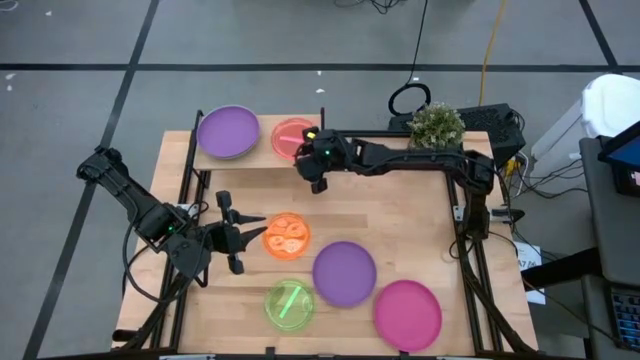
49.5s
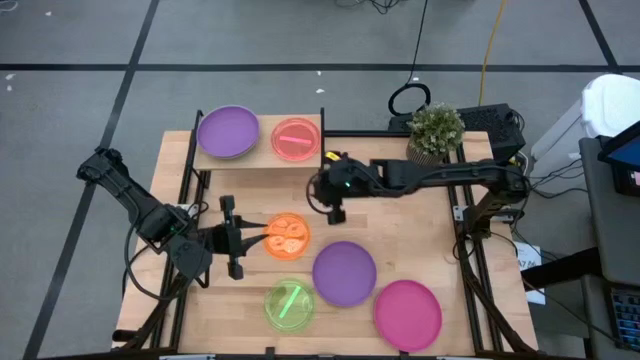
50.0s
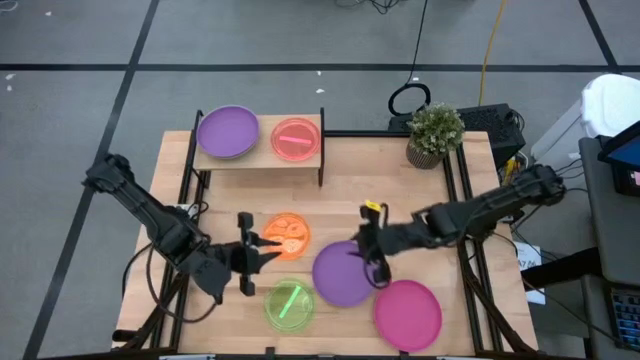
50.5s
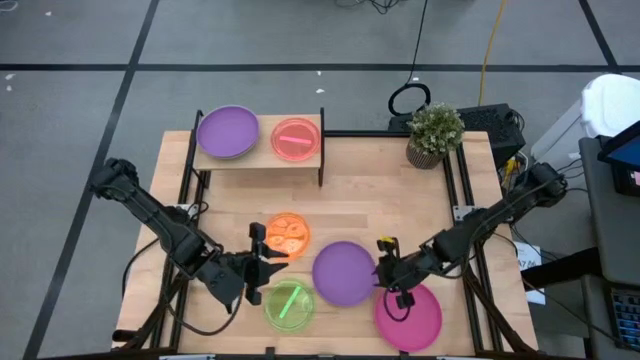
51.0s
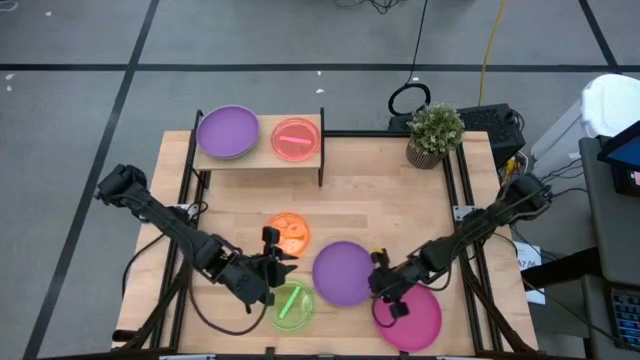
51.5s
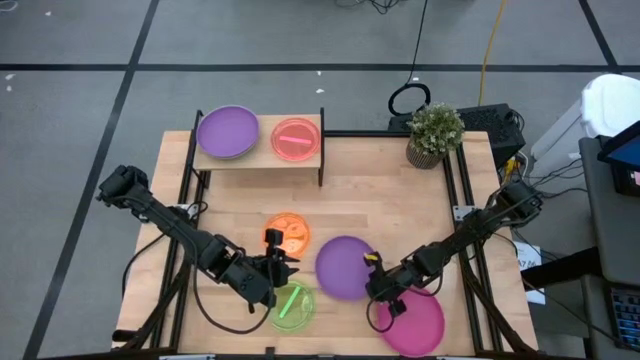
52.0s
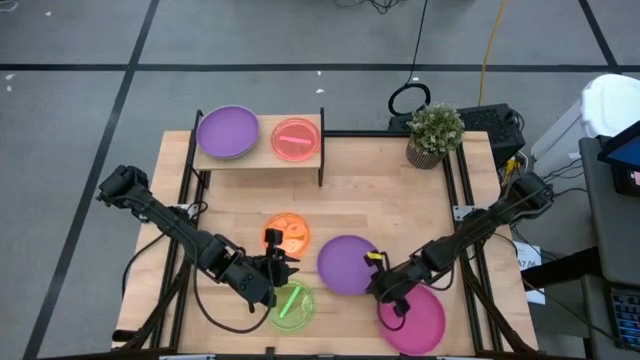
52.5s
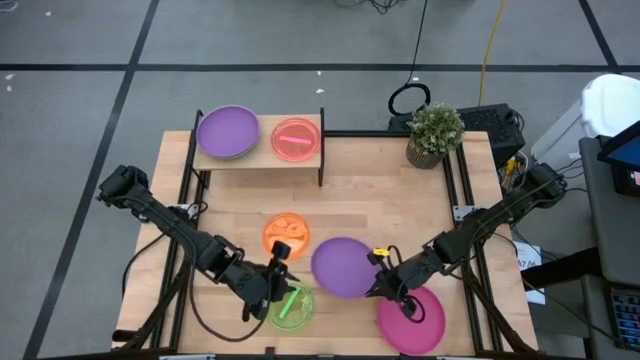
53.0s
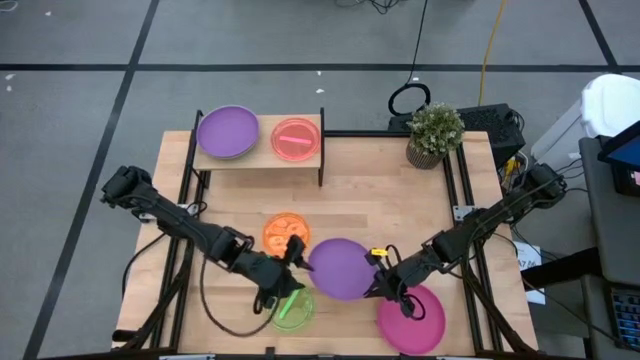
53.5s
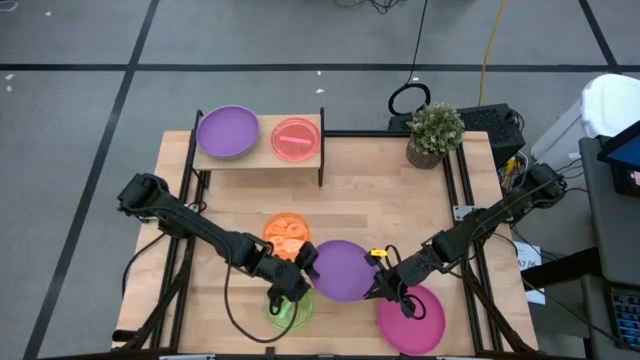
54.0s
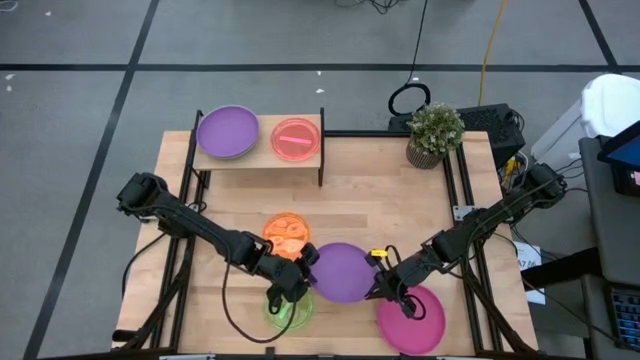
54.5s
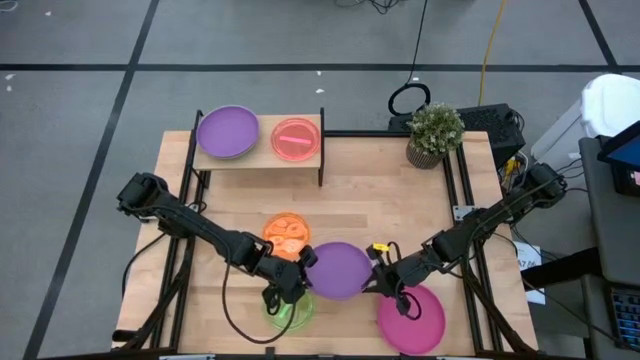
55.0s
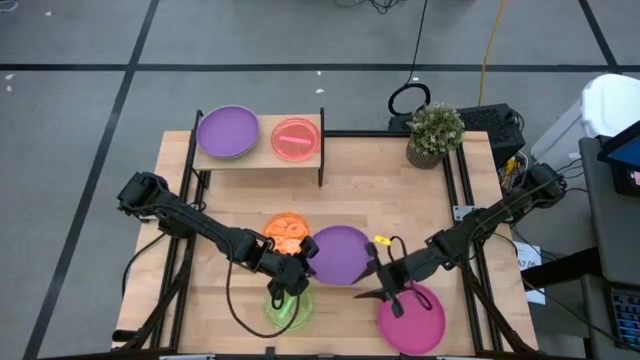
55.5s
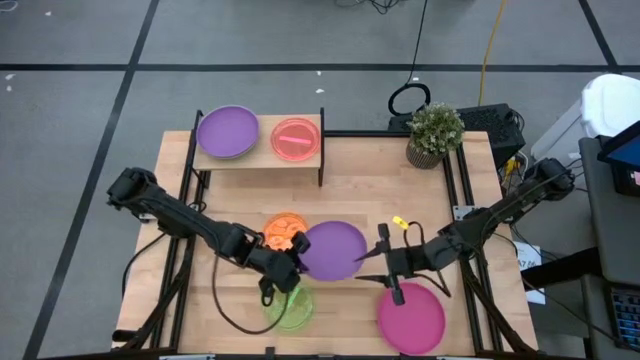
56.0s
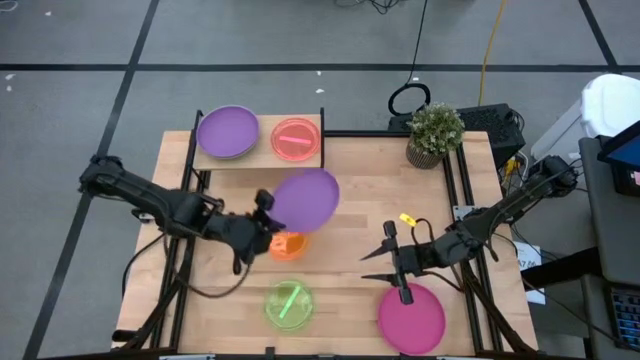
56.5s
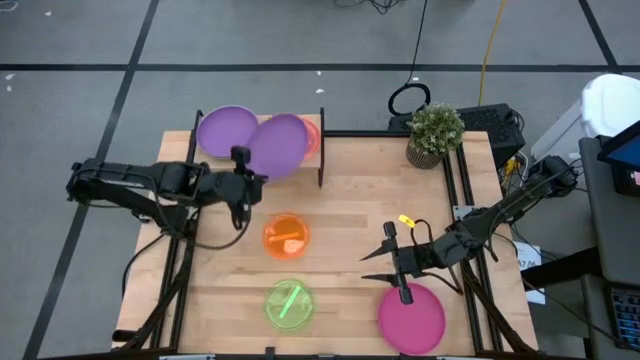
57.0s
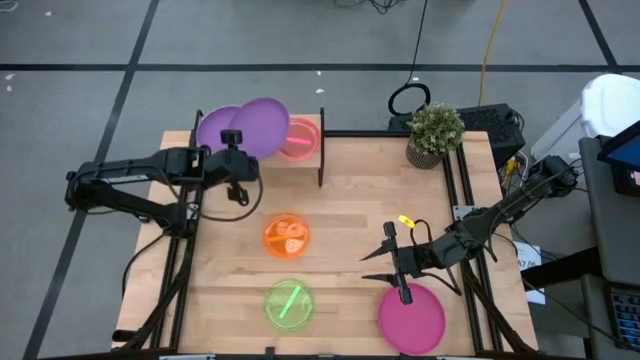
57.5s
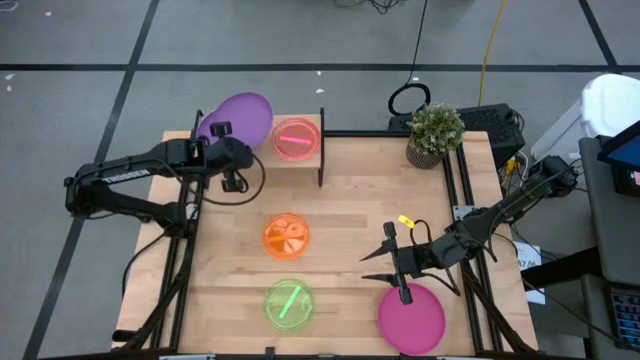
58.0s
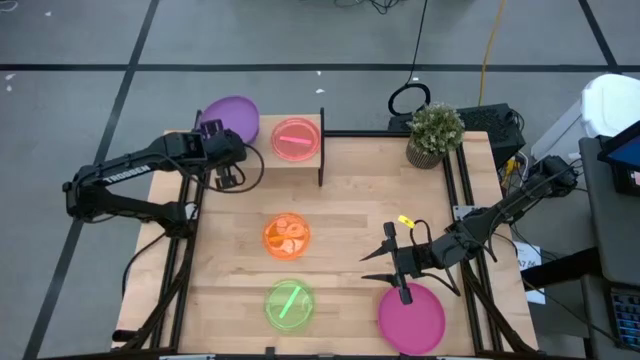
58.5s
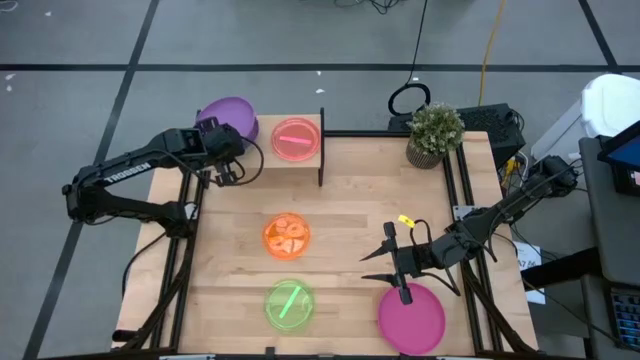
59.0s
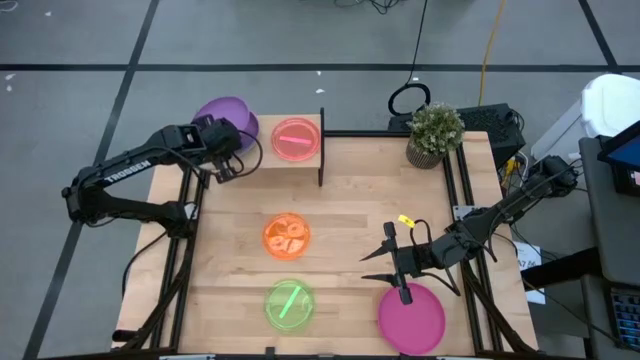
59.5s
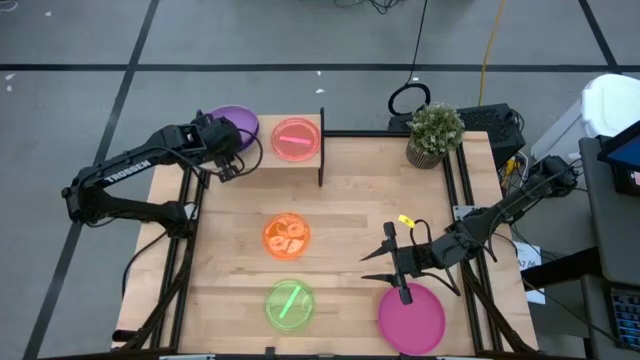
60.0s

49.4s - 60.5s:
Task: Place and stack plates onto a shelf
Stack the purple plate on top of the purple plate on the shelf

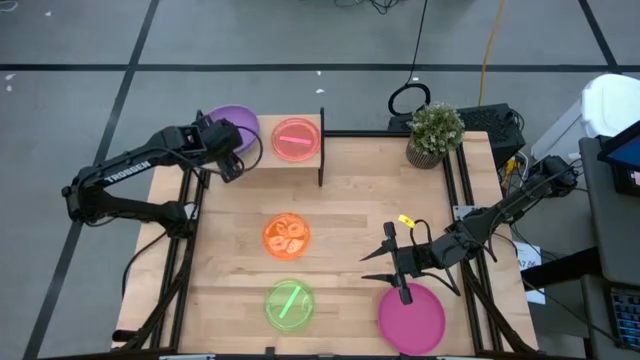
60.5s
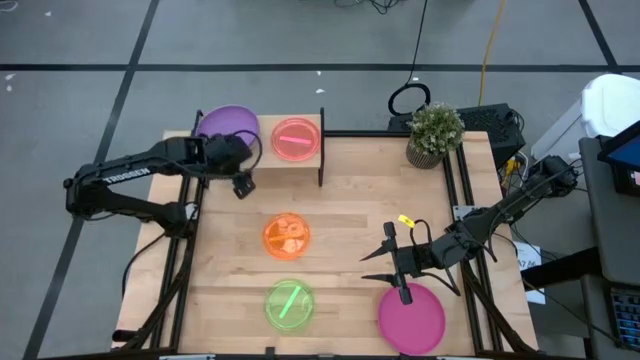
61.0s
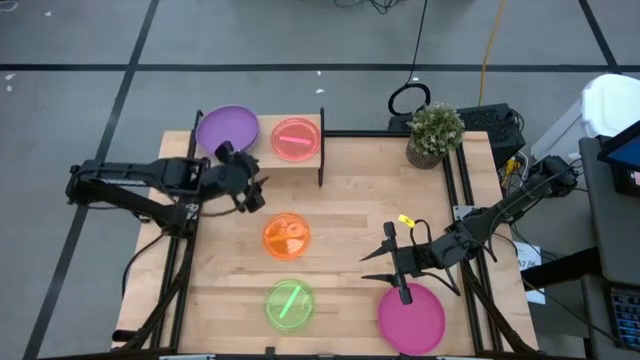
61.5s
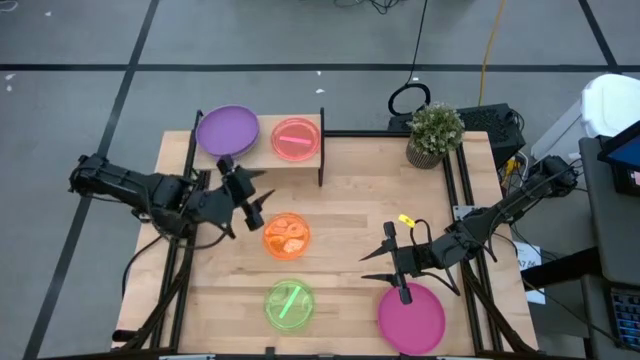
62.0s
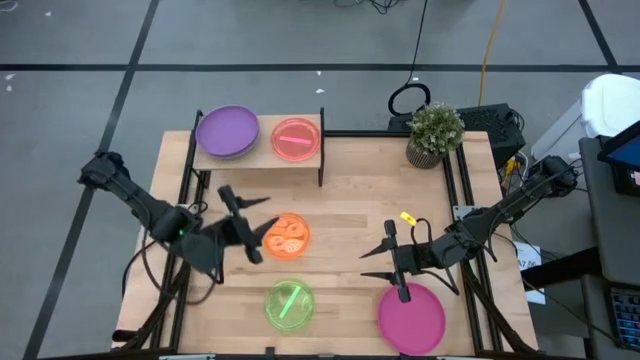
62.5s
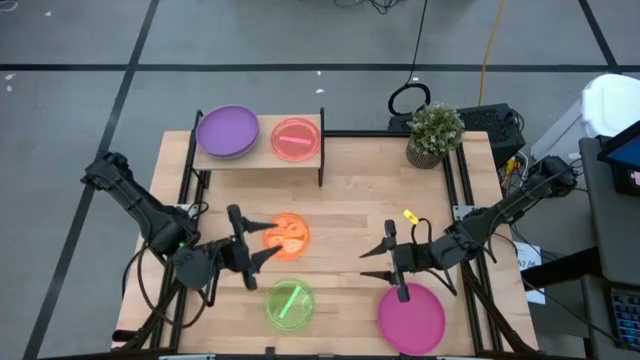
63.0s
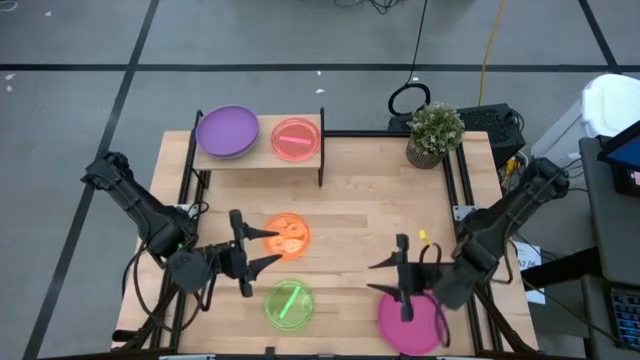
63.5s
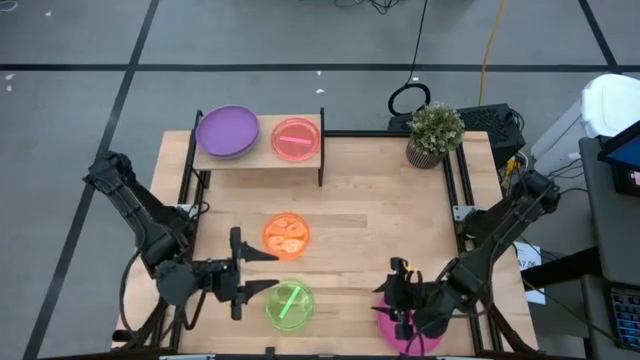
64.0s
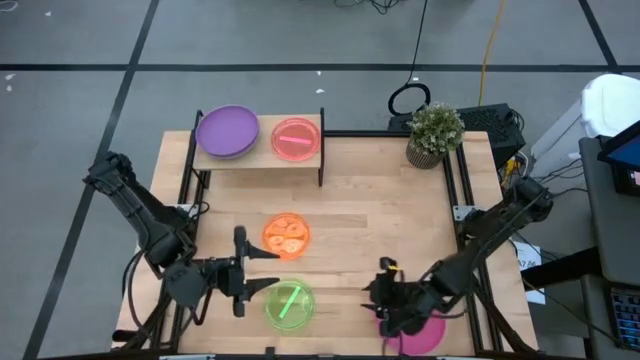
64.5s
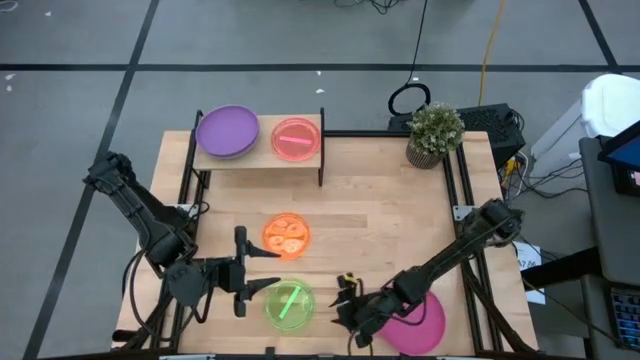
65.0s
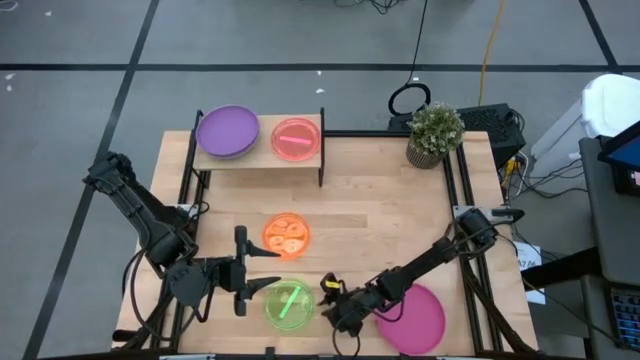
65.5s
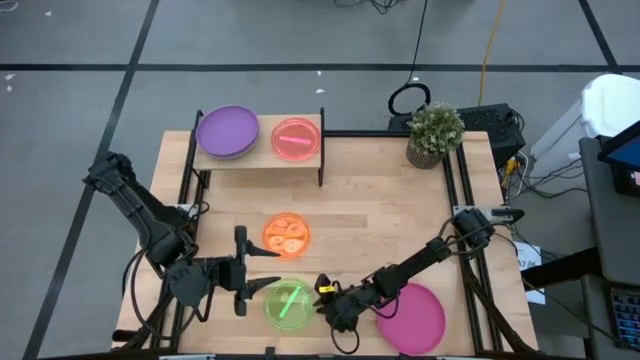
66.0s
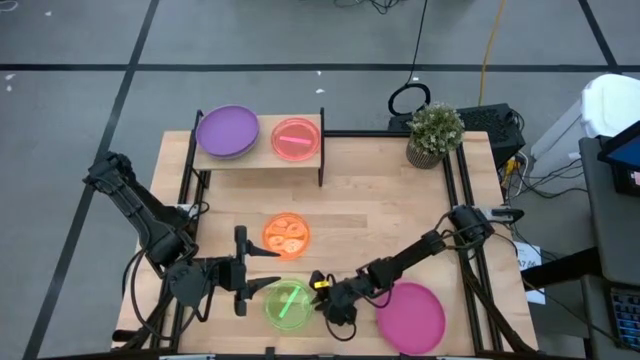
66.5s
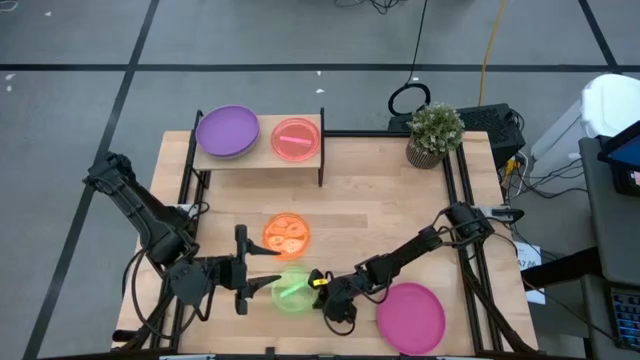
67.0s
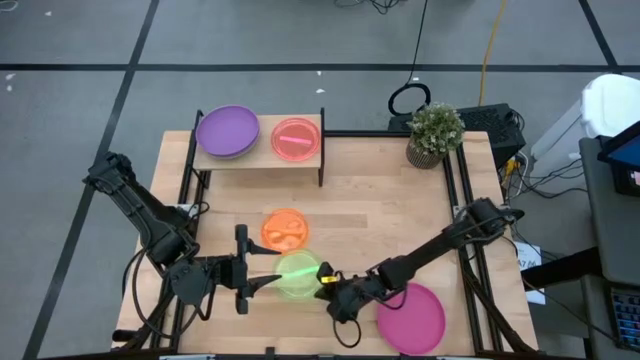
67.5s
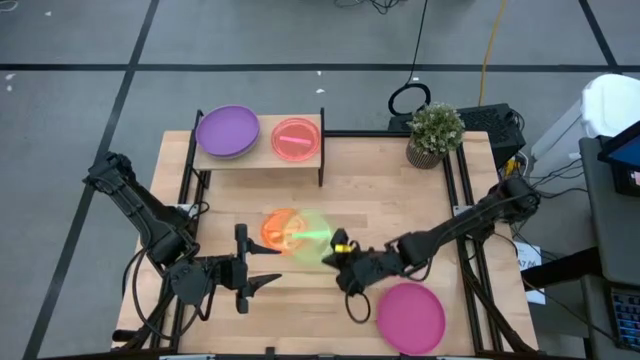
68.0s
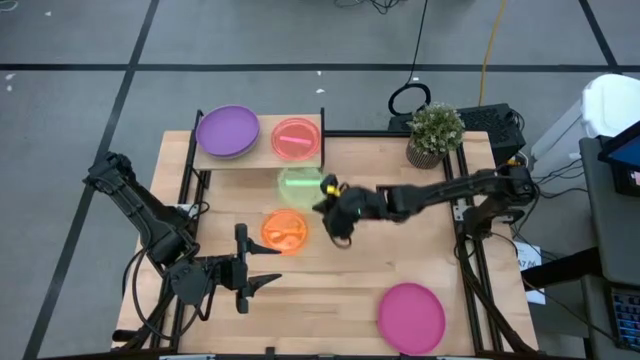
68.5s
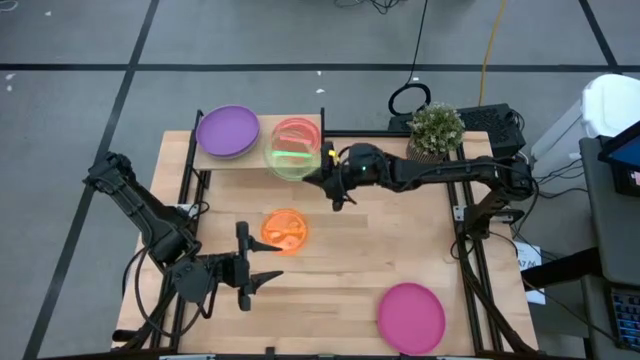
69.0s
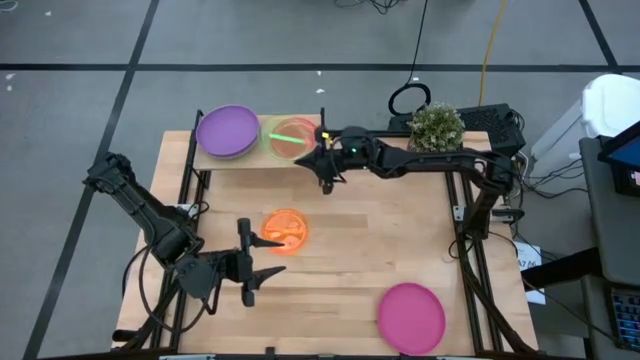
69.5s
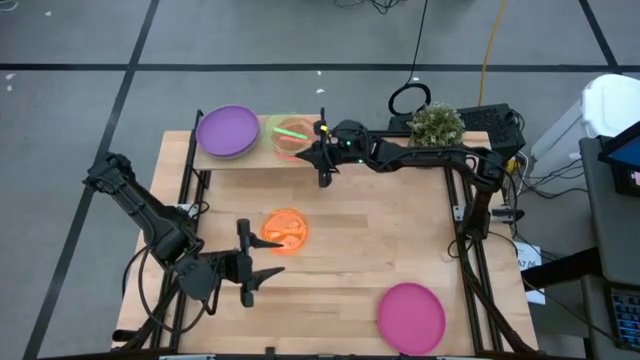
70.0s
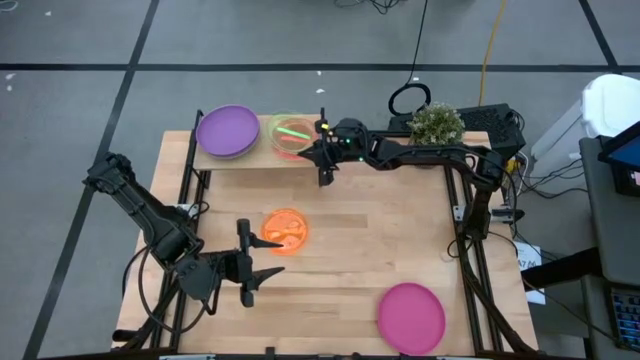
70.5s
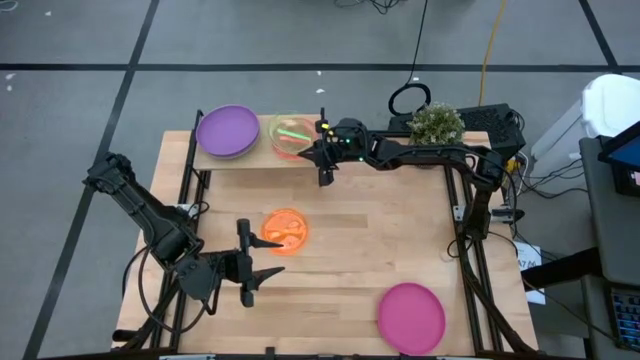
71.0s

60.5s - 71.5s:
Stack the transparent green plate on top of the transparent pink plate on the shelf
